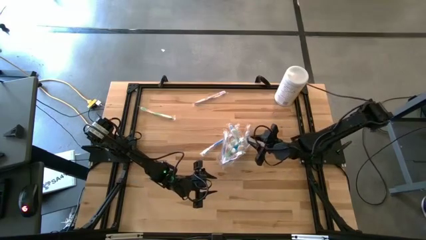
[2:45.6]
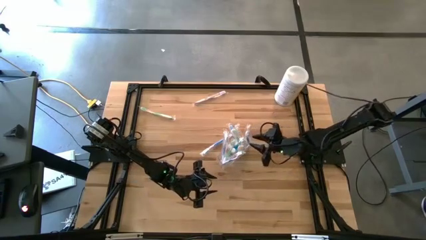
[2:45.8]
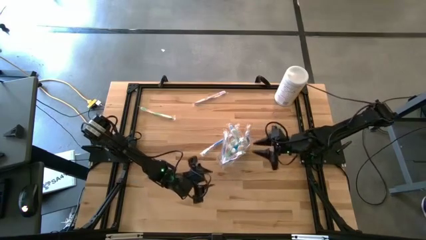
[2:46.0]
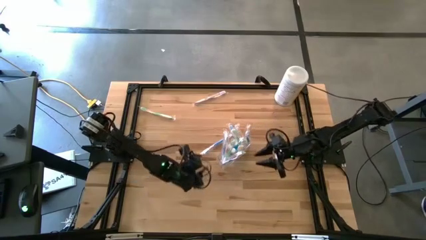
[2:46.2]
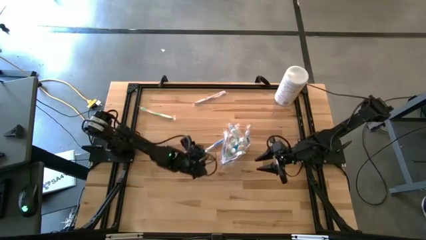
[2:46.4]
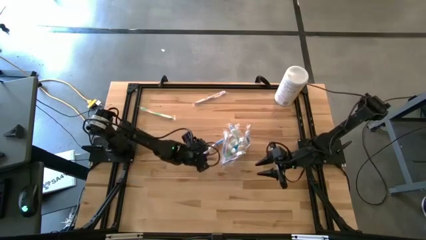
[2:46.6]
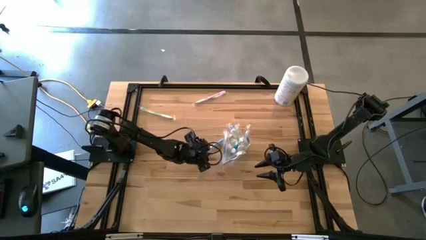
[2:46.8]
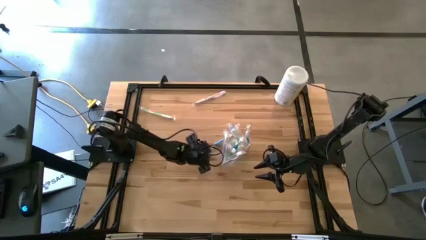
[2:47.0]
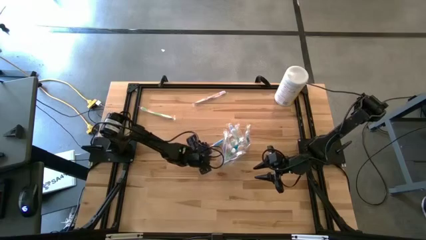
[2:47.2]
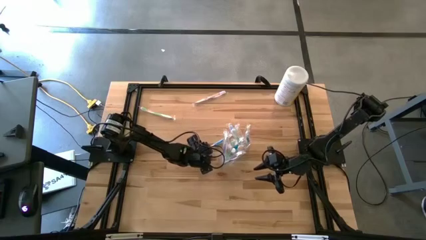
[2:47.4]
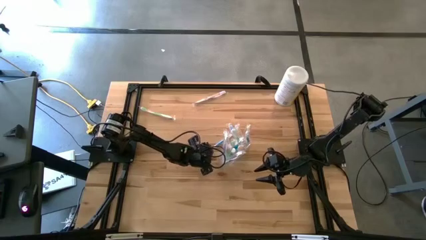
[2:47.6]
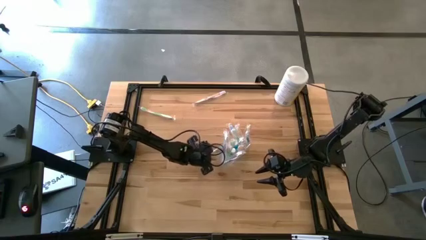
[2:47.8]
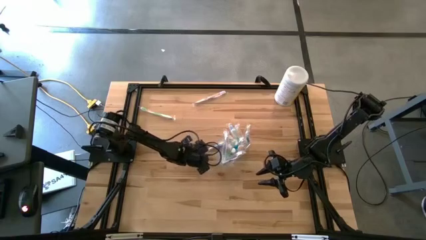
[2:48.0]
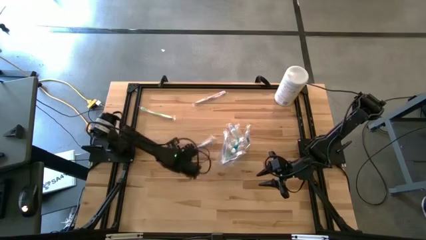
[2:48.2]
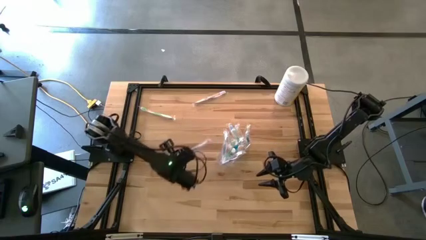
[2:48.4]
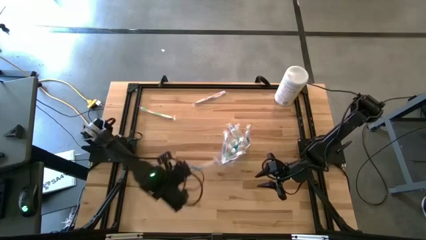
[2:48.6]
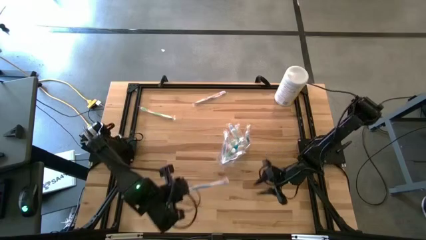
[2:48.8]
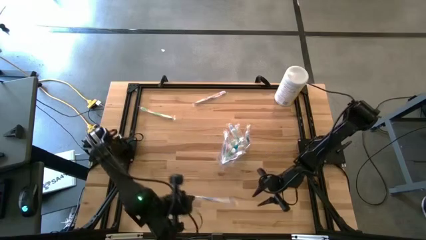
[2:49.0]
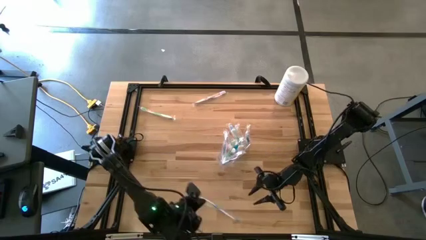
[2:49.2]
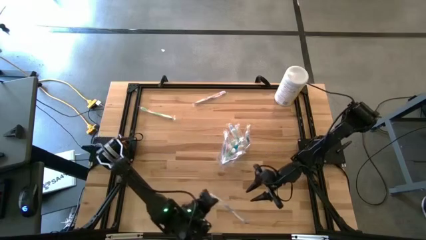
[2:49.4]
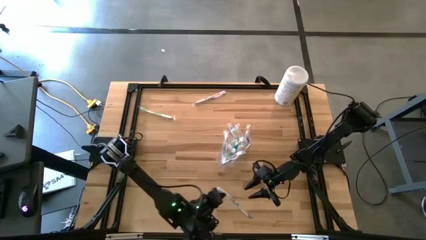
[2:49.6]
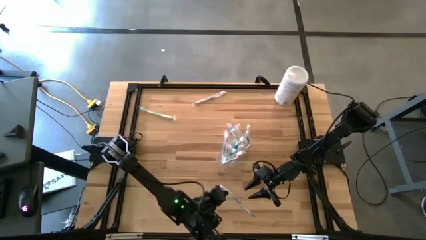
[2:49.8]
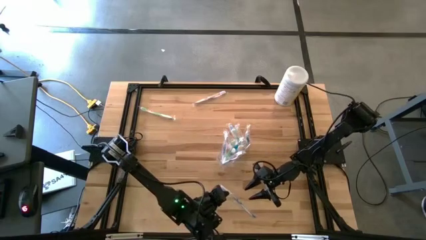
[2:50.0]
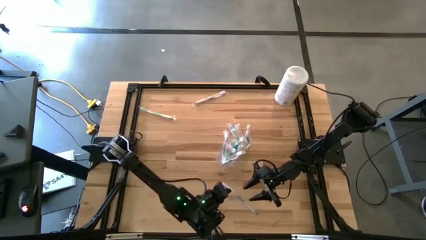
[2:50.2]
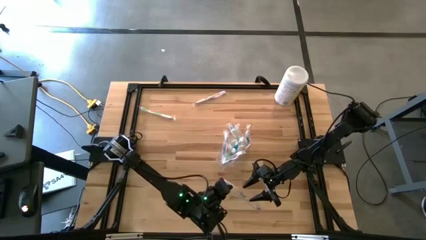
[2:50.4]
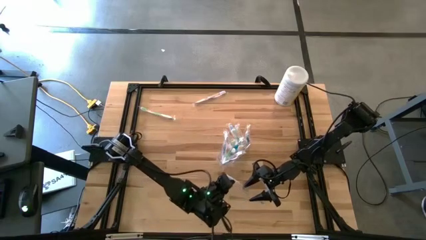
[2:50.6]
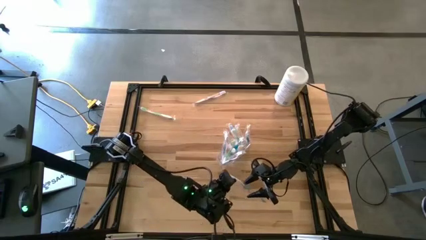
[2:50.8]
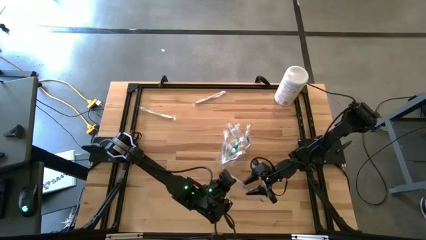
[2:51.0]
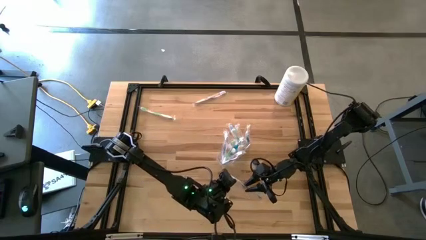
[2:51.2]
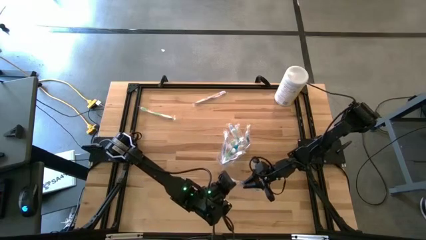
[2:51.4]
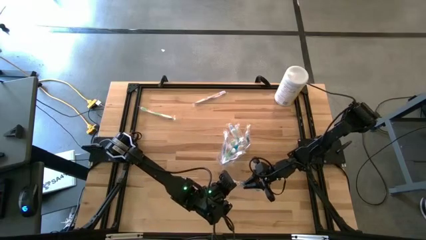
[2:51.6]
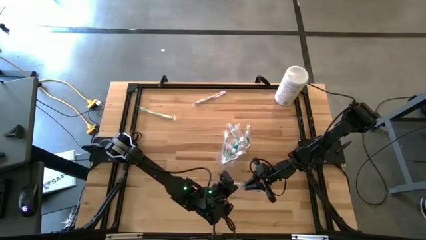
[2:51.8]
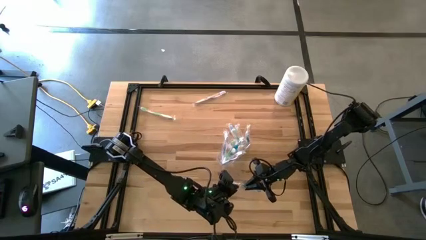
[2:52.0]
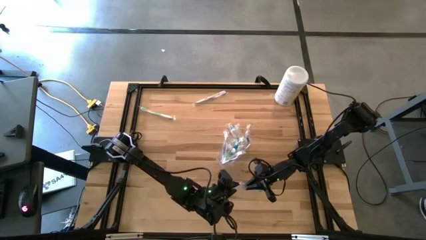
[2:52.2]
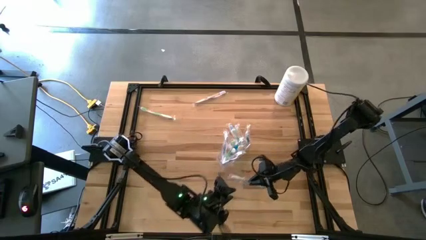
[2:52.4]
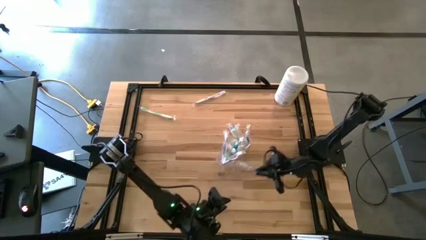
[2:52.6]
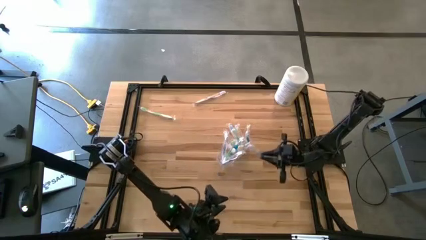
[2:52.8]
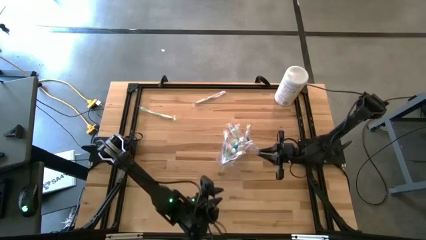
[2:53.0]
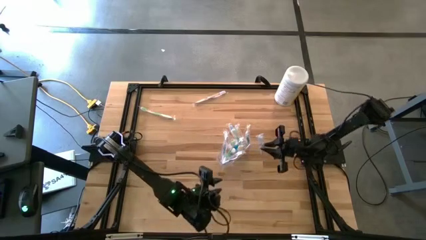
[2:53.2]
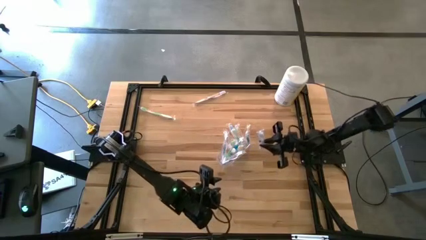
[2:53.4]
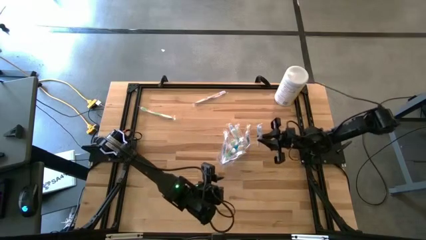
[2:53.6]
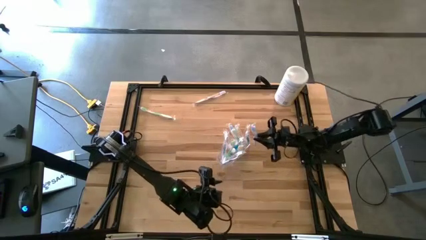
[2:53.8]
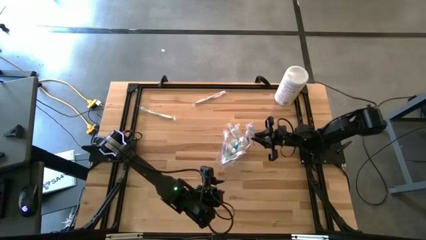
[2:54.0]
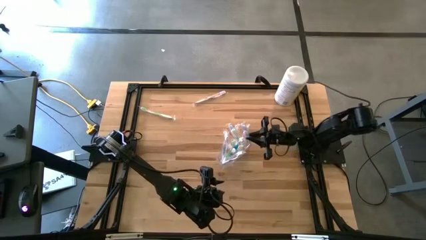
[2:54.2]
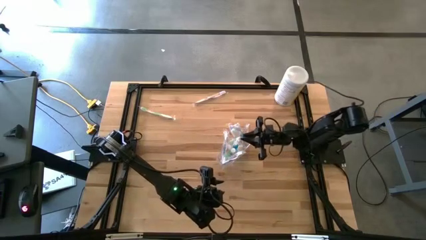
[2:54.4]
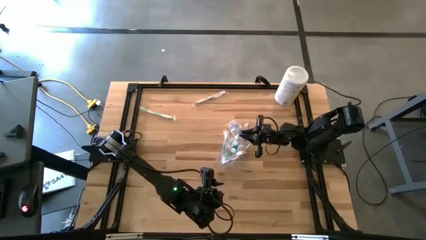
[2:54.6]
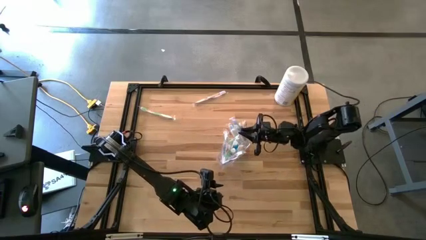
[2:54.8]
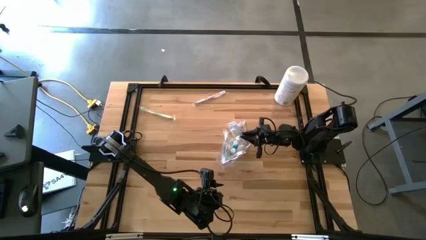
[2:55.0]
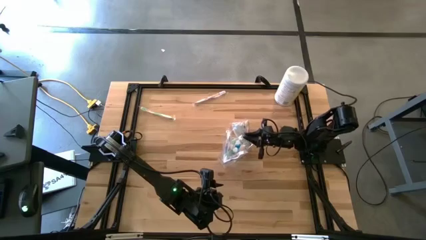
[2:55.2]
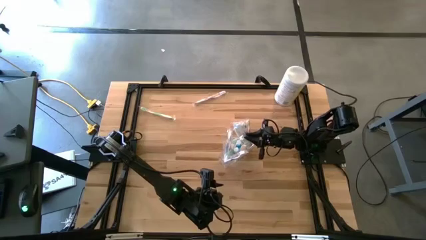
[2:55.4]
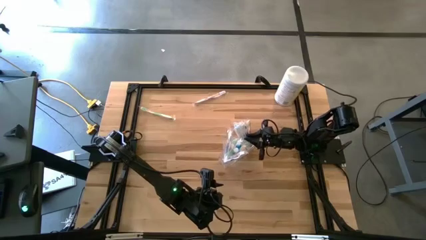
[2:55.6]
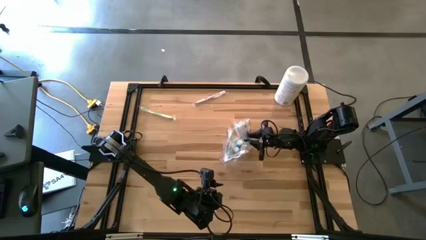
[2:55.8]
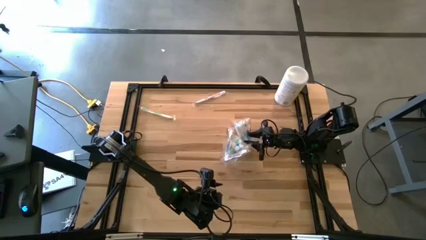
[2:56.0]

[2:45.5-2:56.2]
Task: Pick & Place toothbrushing station
Put the blue toothbrush into the transparent organizer
